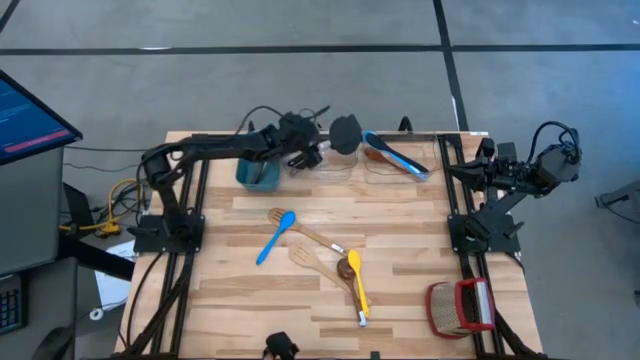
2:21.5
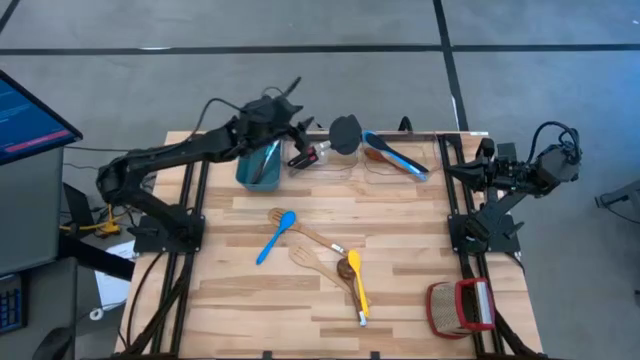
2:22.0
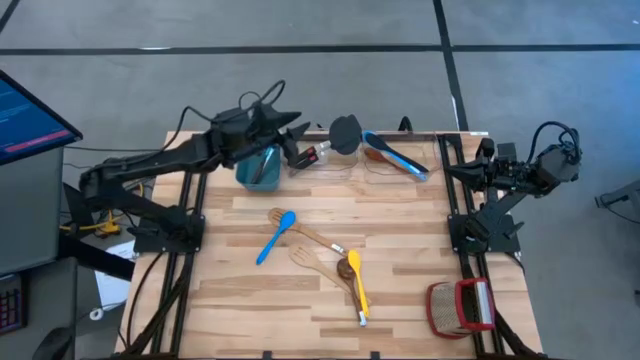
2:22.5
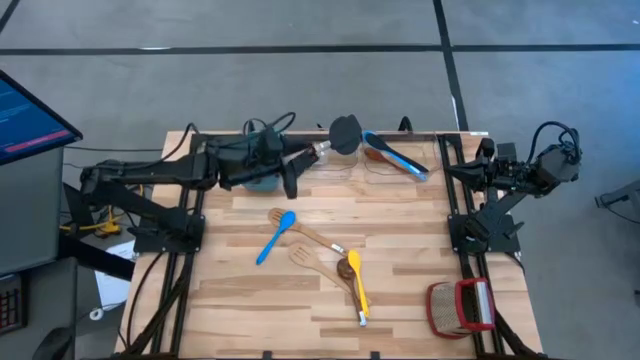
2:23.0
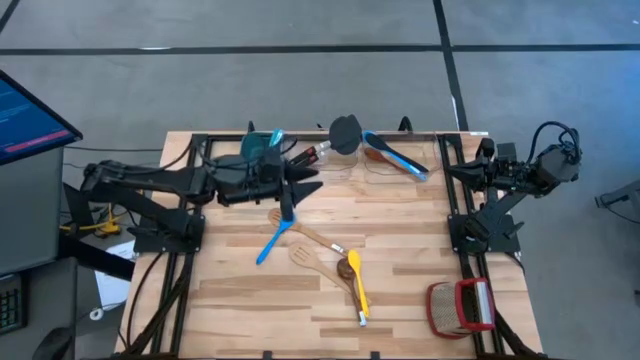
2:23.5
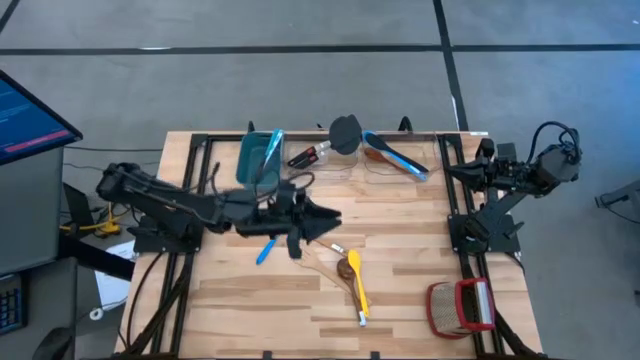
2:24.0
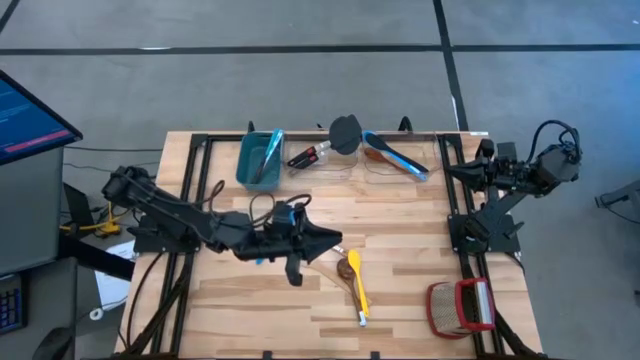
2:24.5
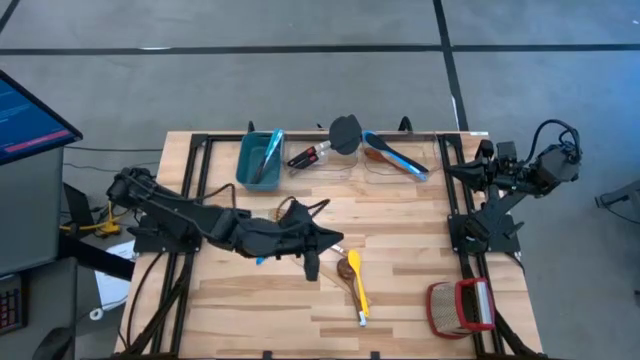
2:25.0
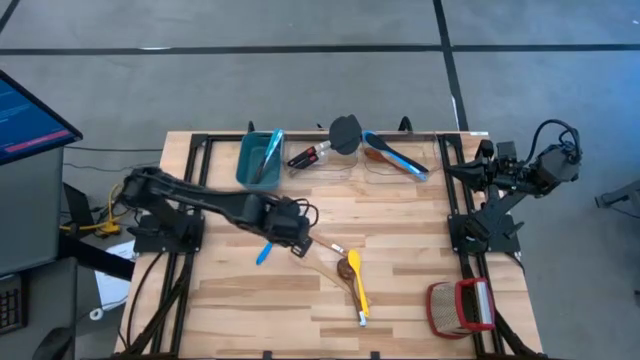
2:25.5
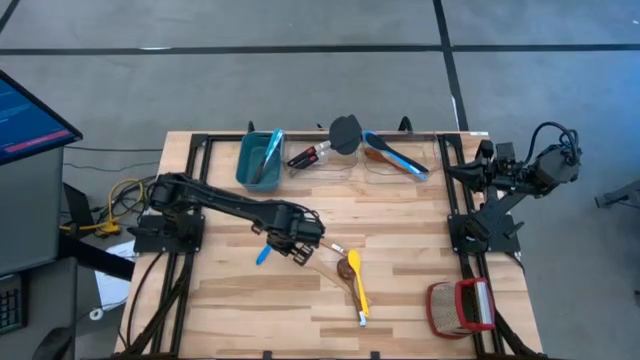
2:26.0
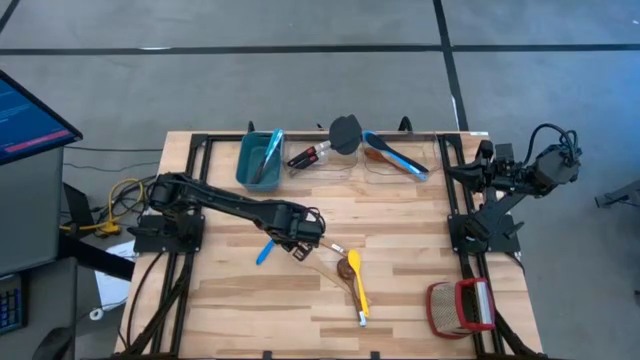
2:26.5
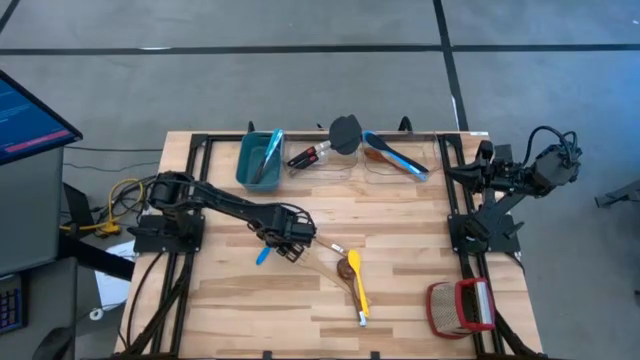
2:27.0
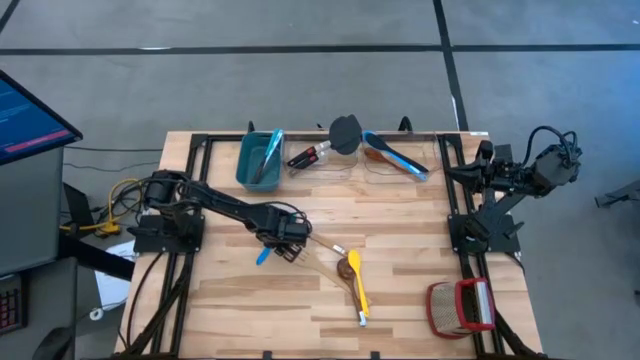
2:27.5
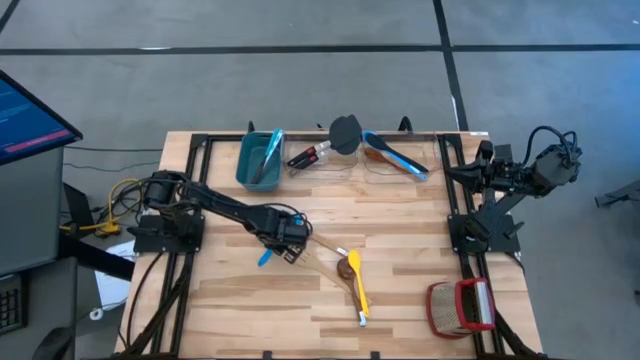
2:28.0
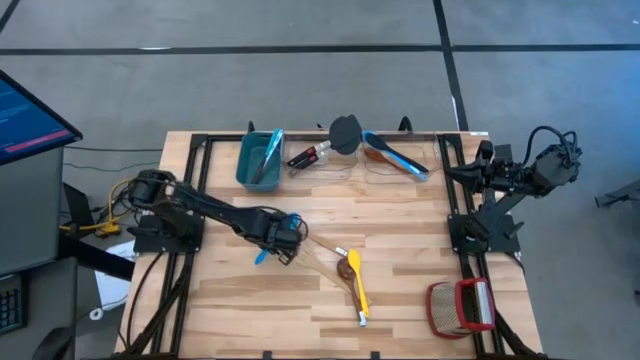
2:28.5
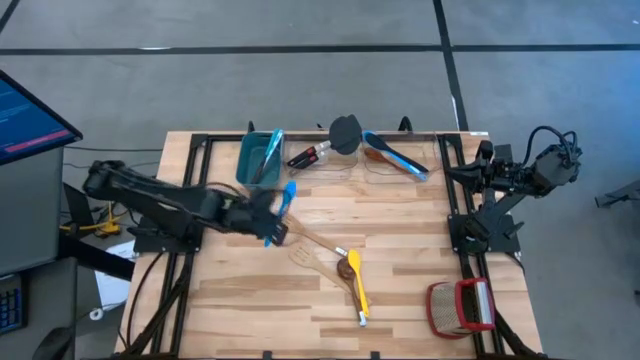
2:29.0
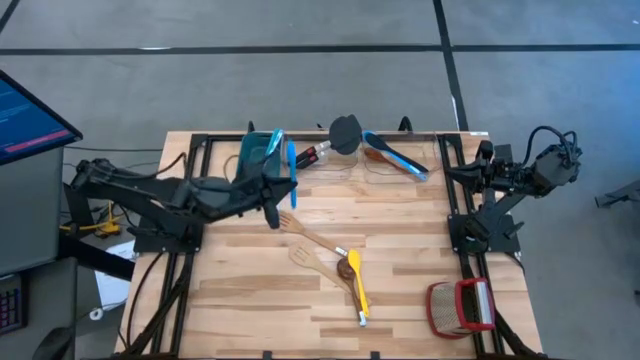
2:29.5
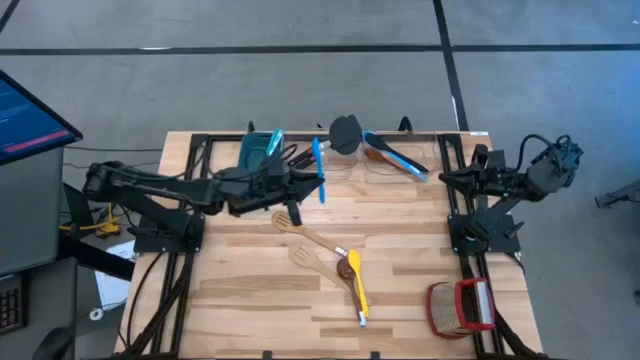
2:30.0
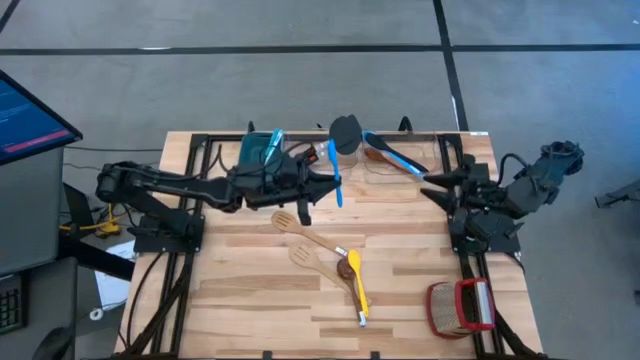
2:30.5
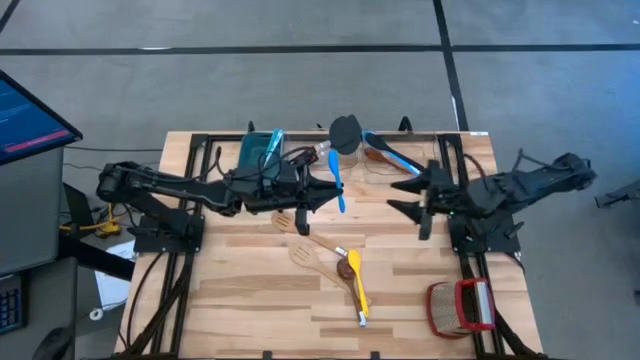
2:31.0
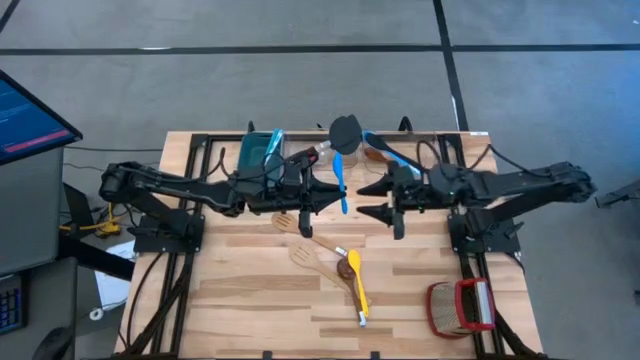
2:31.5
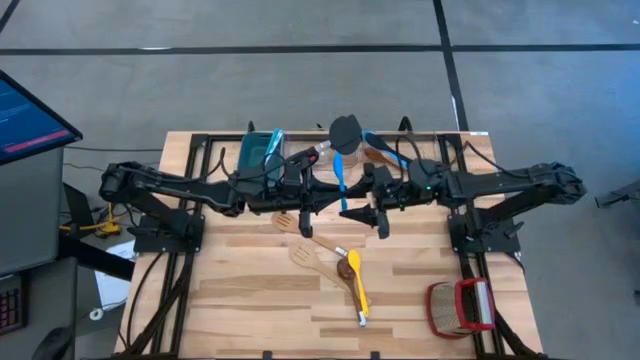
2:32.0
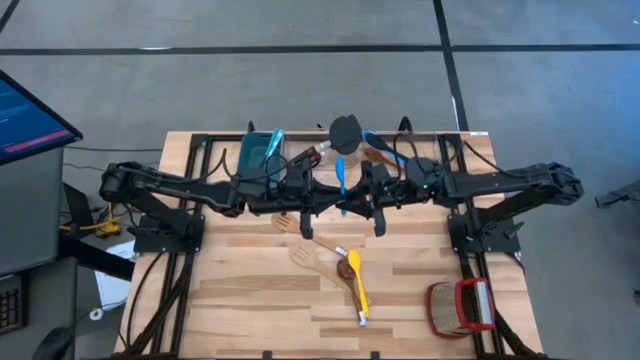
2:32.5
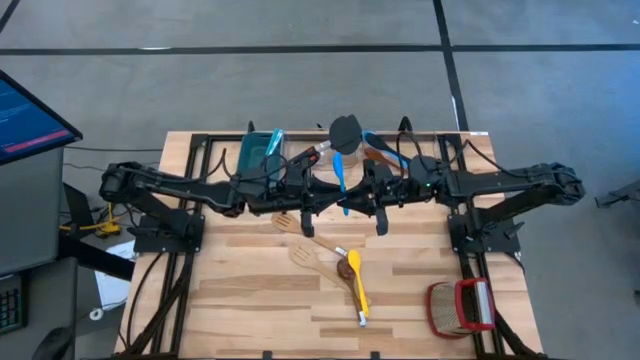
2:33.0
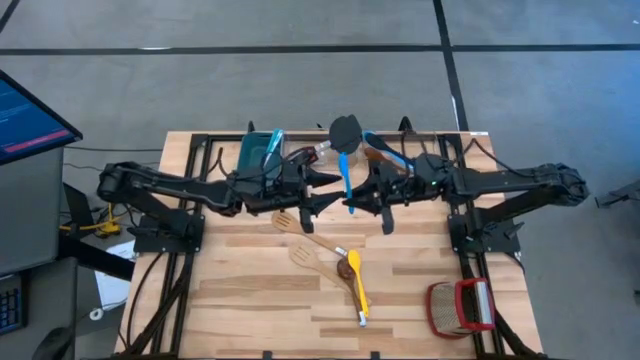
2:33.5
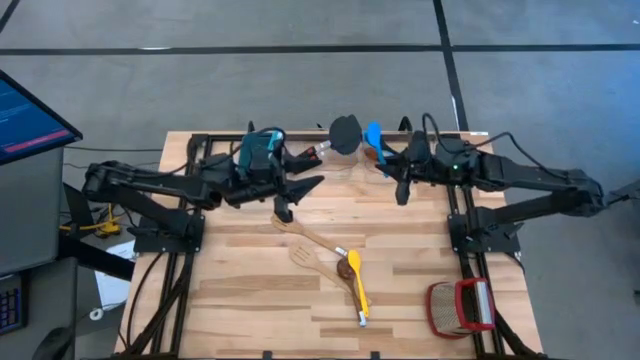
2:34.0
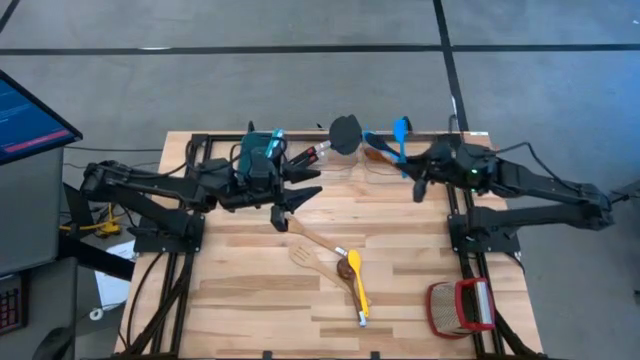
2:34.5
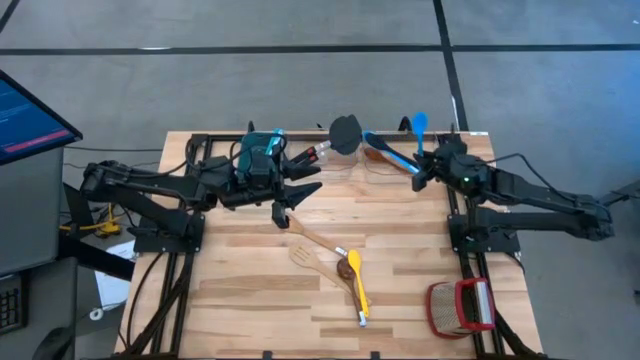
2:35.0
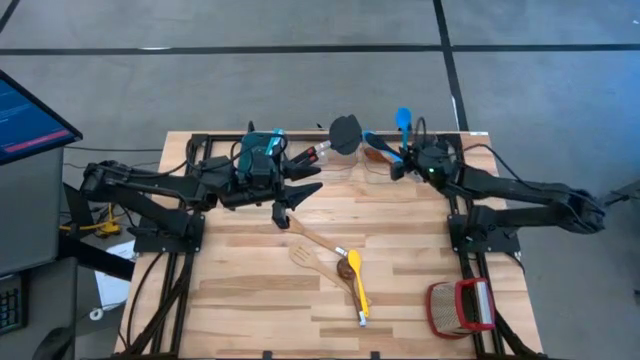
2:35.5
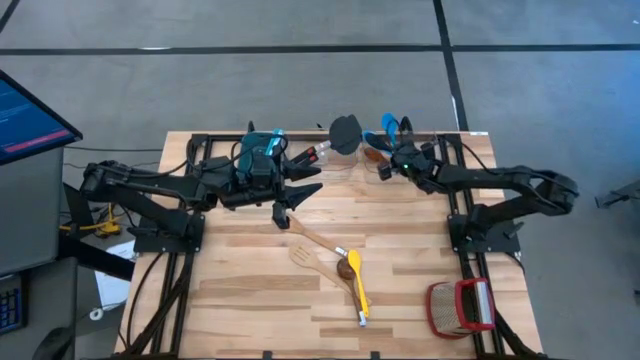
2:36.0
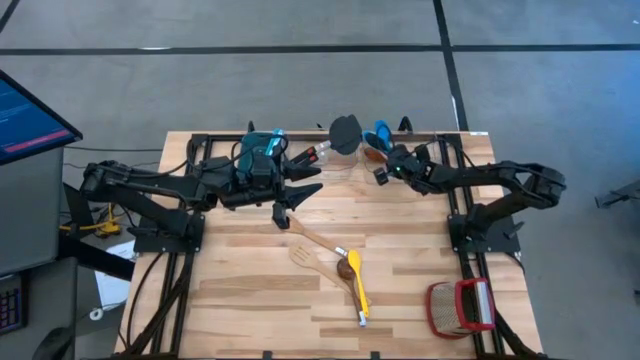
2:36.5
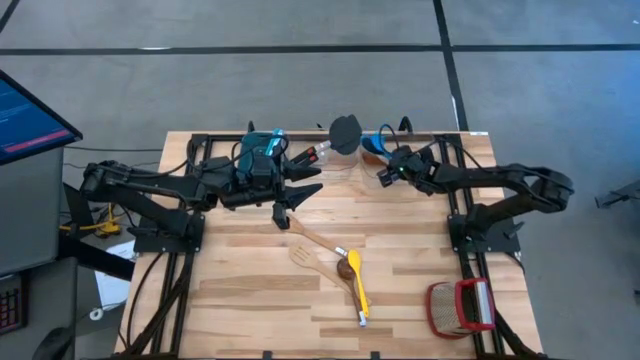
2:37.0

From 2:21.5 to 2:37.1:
Task: Pick & Place Kitchen Items
Put the blue serving spoon into the right transparent bin

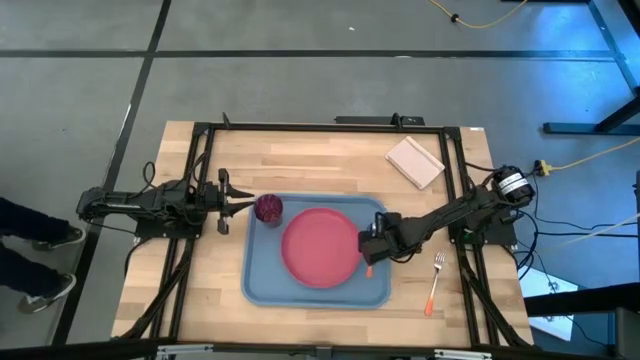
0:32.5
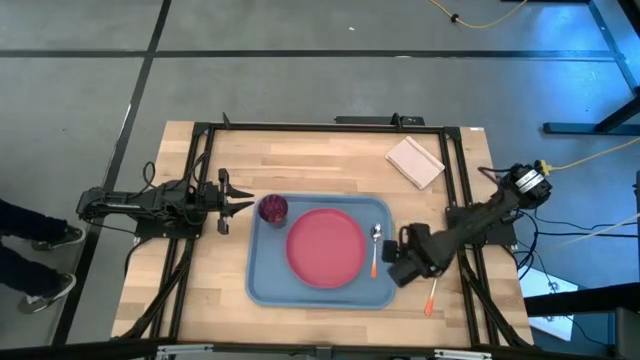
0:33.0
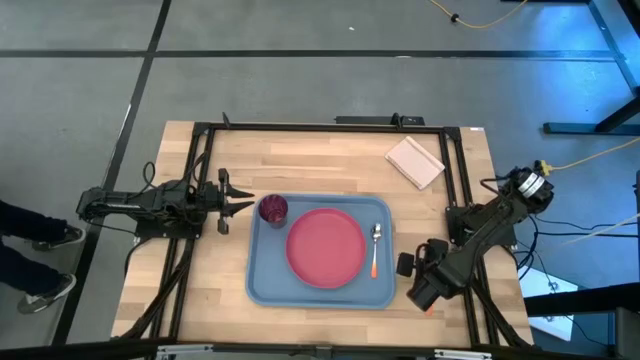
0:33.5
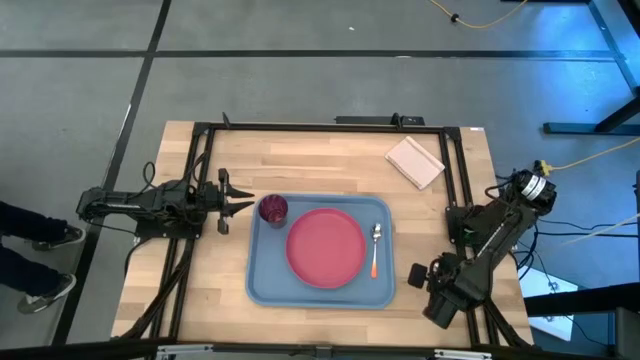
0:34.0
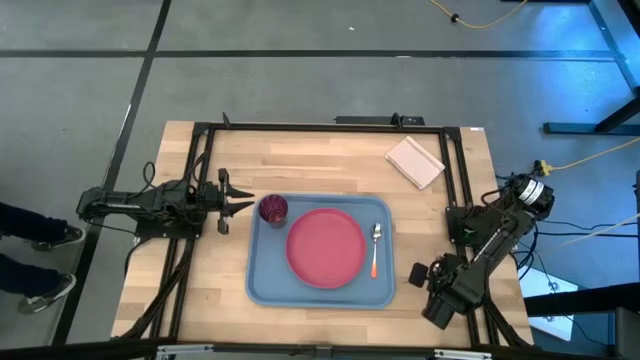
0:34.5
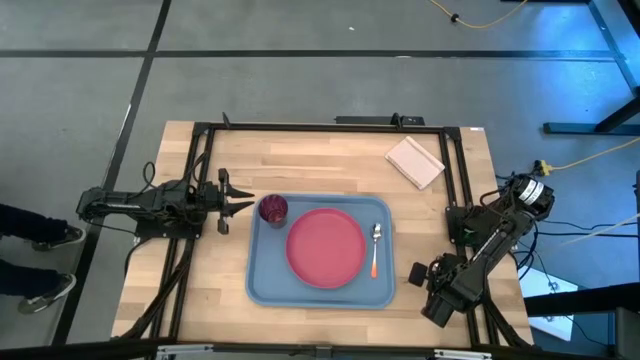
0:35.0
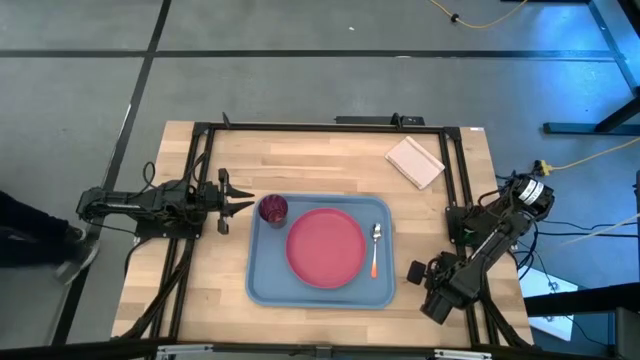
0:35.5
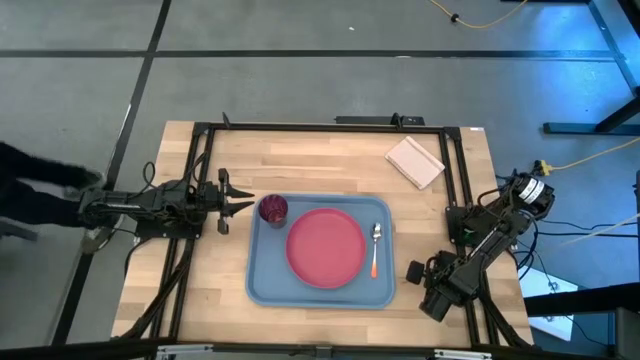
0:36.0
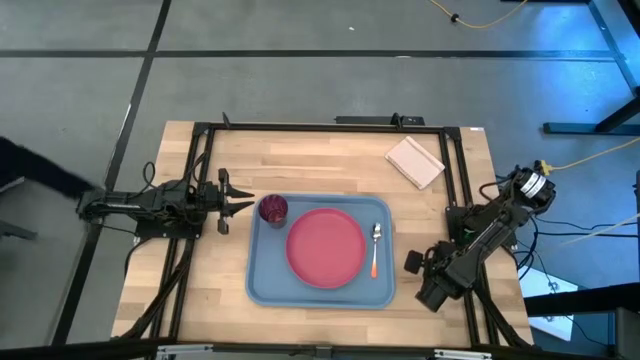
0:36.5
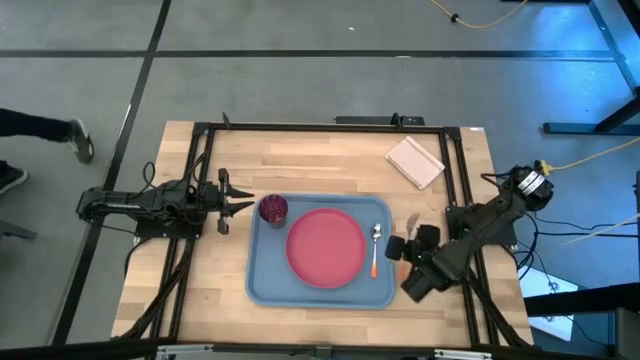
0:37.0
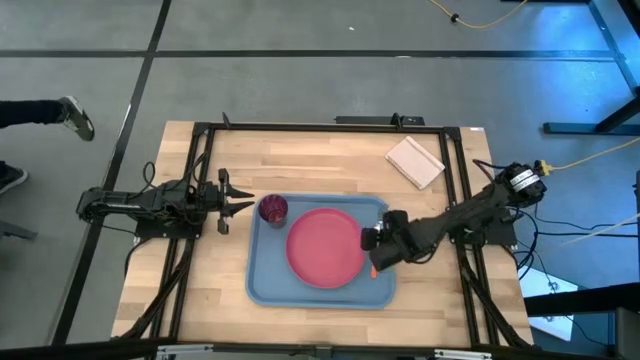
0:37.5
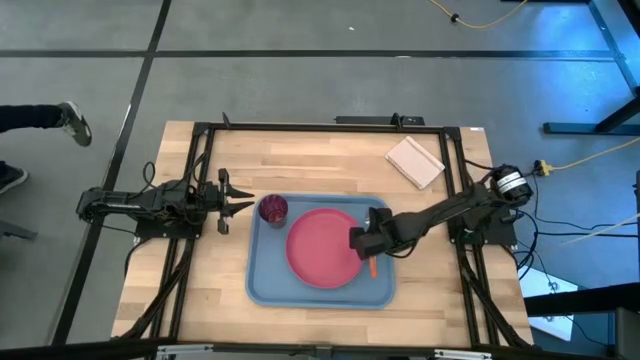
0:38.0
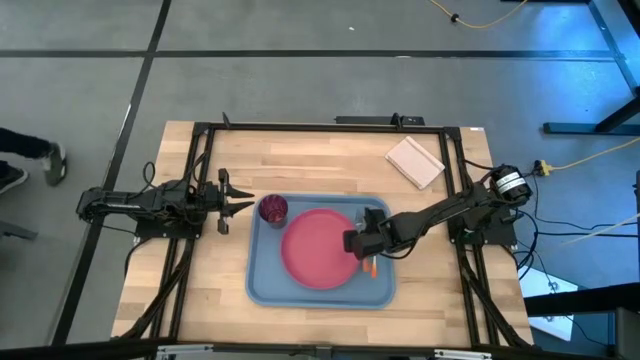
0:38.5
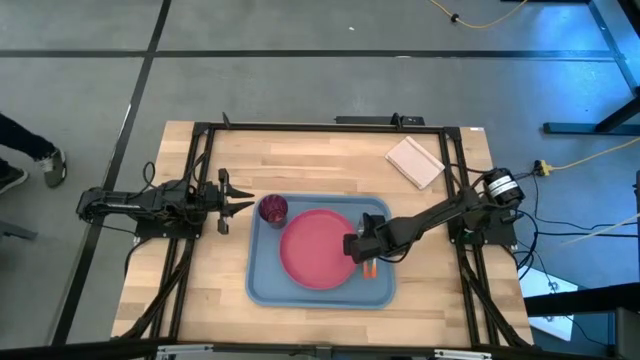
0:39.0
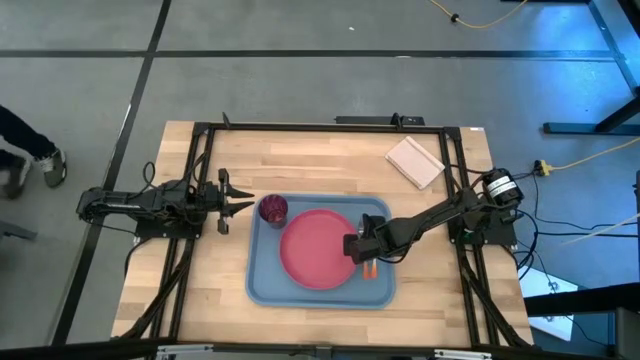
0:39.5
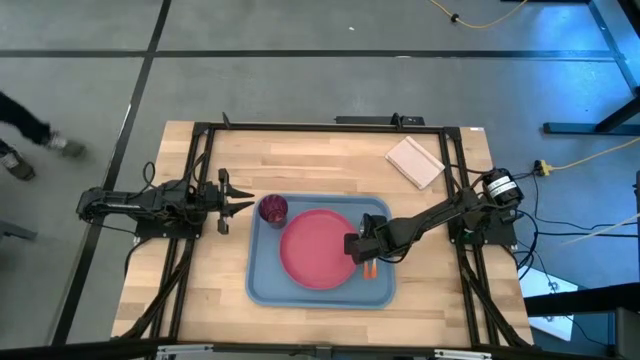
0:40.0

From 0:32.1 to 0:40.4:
Task: Pick and place plate/cup/fork/spoon on tray
Put the orange fork on the blue serving tray to the left of the orange spoon
